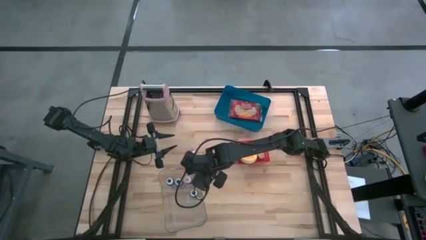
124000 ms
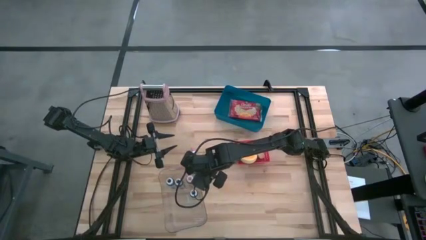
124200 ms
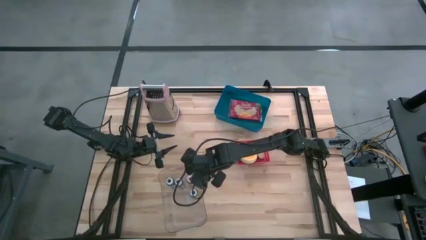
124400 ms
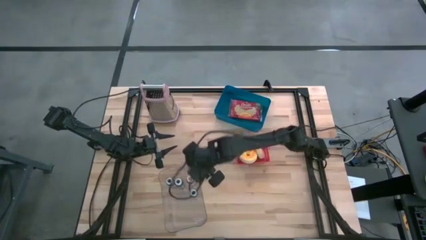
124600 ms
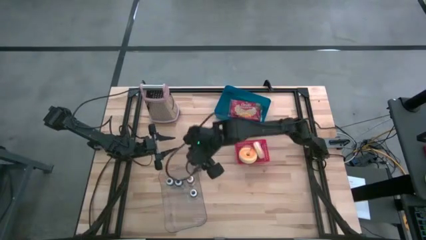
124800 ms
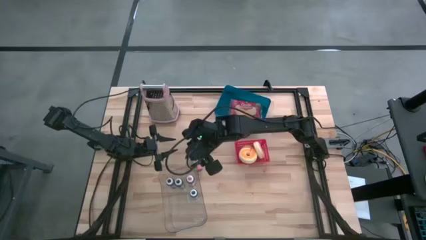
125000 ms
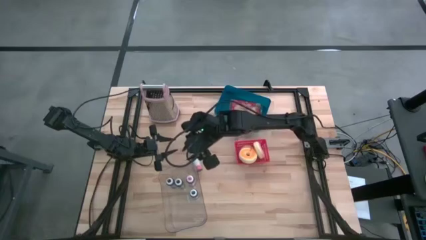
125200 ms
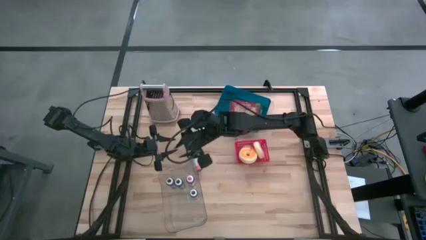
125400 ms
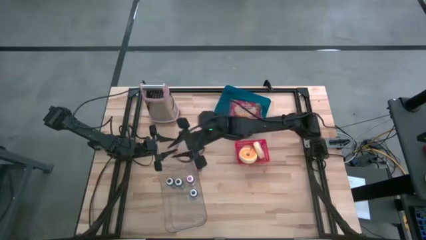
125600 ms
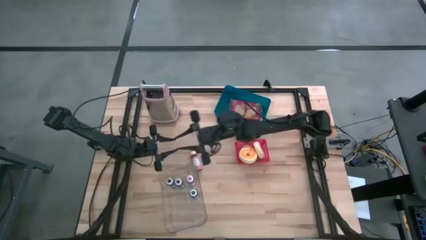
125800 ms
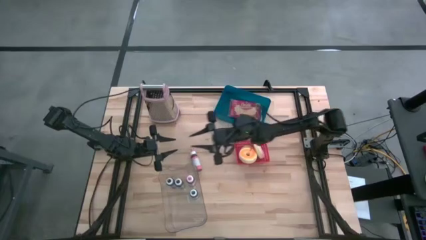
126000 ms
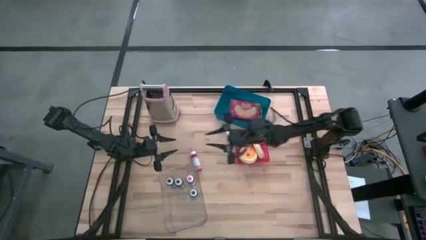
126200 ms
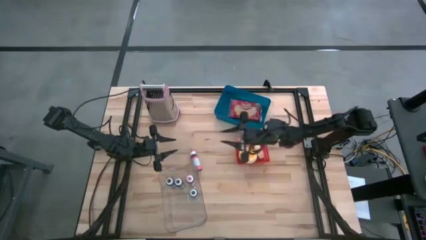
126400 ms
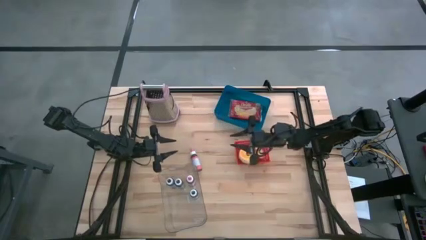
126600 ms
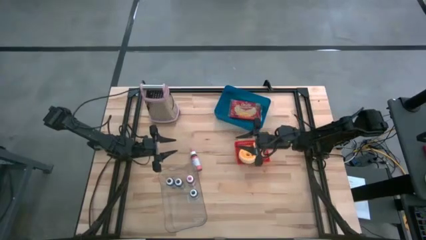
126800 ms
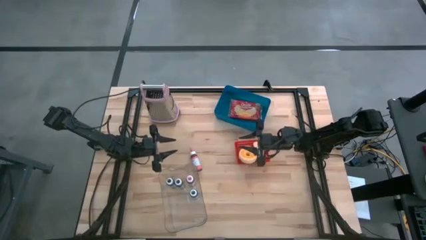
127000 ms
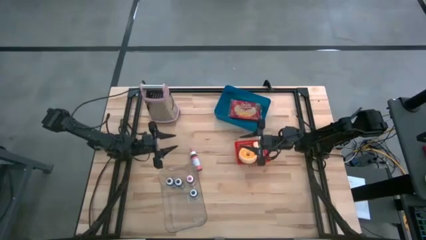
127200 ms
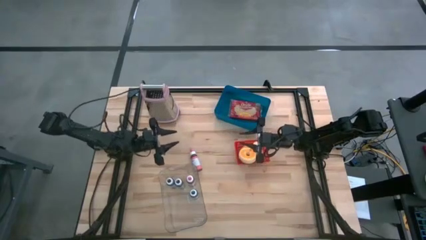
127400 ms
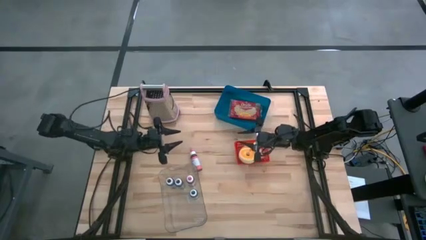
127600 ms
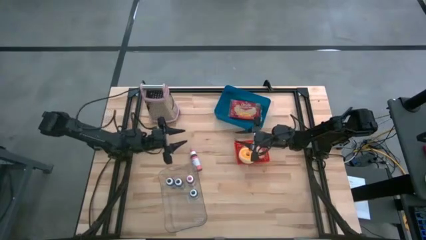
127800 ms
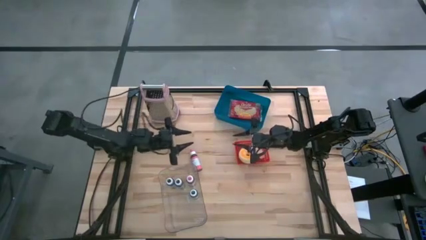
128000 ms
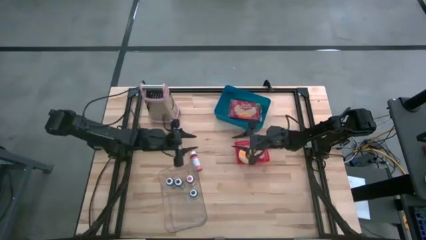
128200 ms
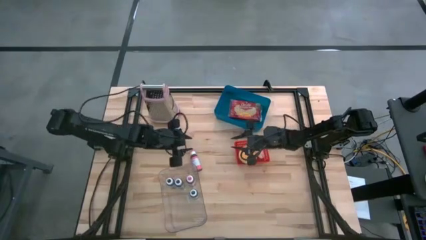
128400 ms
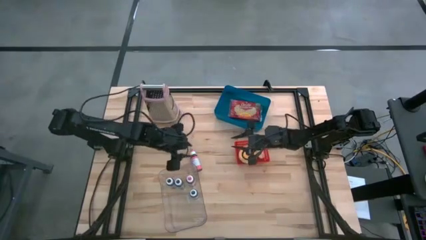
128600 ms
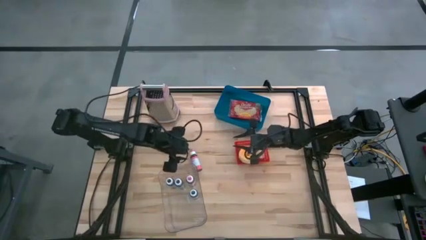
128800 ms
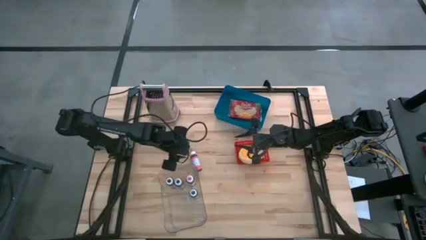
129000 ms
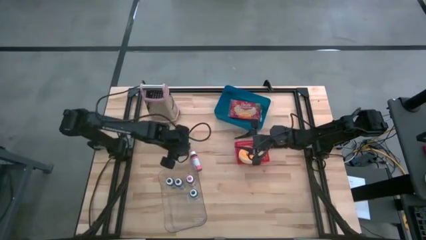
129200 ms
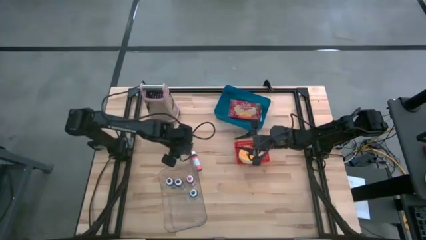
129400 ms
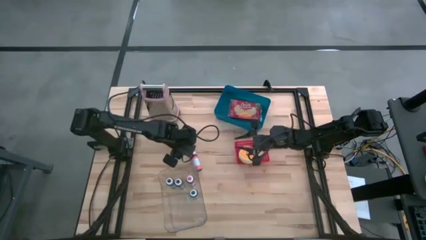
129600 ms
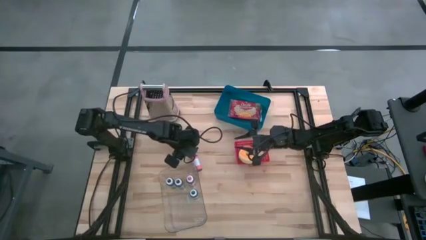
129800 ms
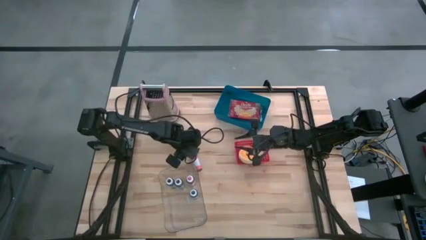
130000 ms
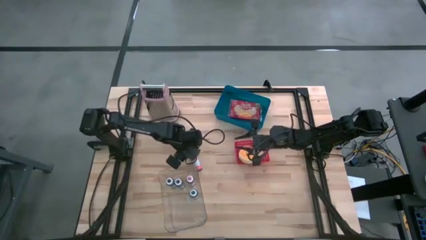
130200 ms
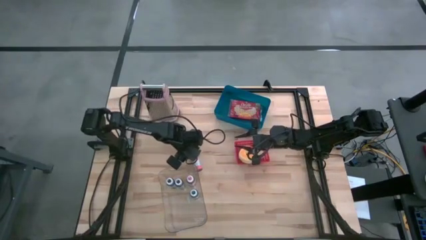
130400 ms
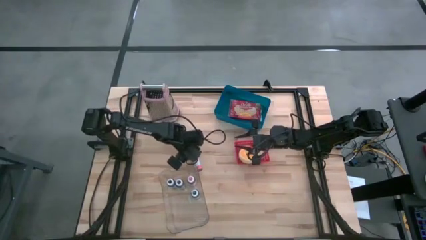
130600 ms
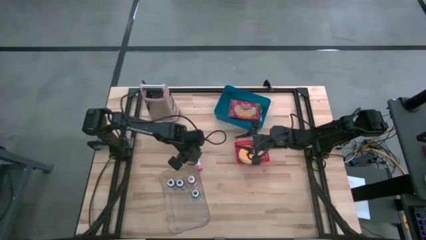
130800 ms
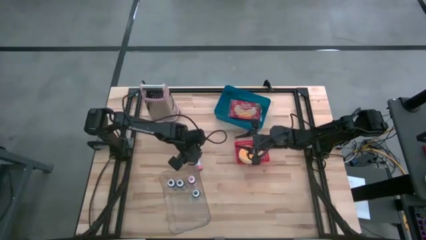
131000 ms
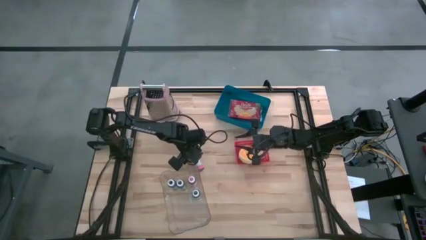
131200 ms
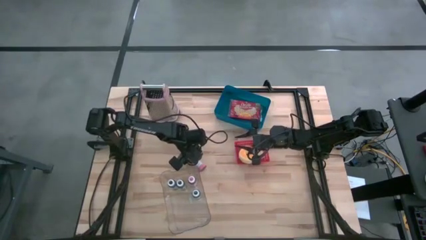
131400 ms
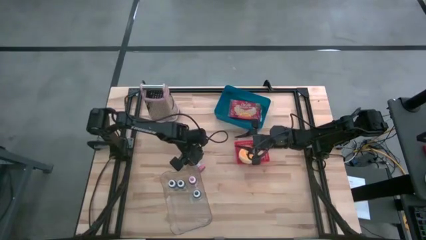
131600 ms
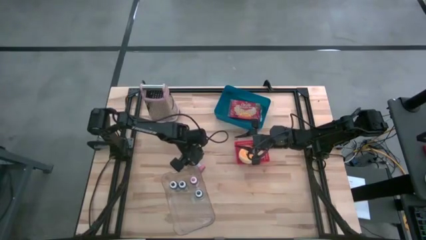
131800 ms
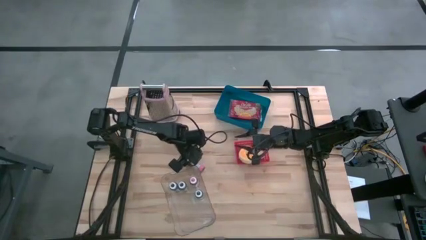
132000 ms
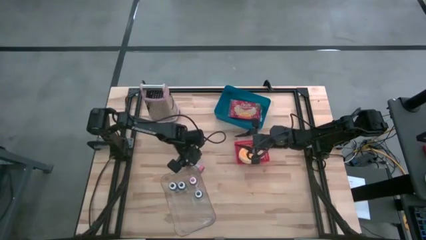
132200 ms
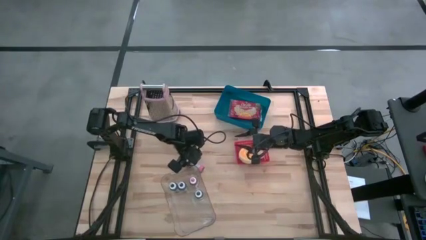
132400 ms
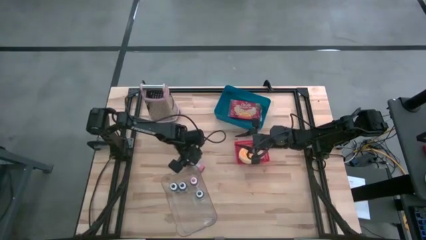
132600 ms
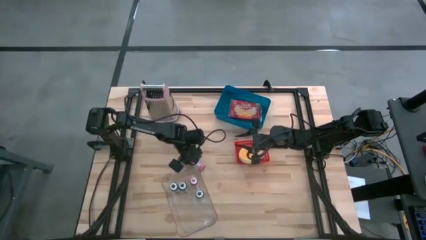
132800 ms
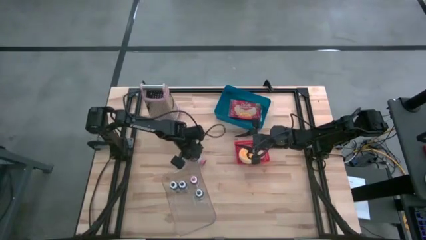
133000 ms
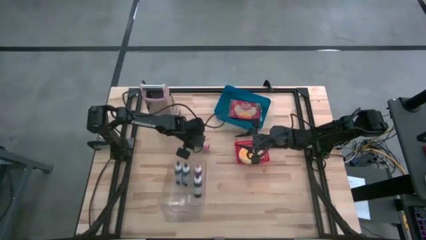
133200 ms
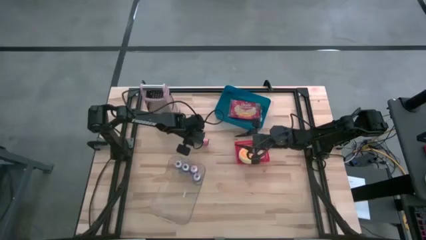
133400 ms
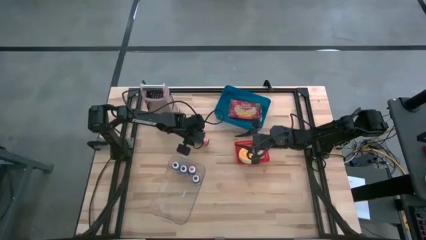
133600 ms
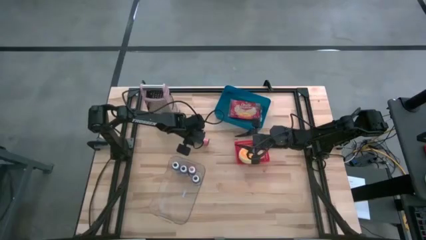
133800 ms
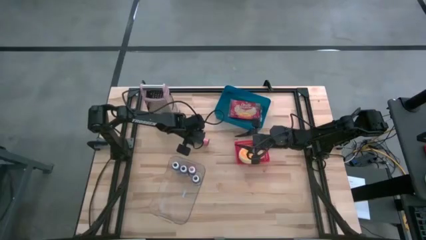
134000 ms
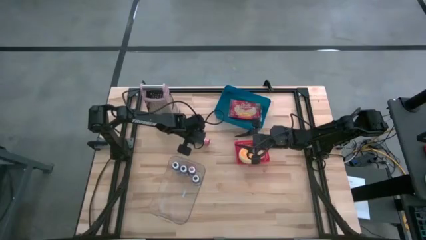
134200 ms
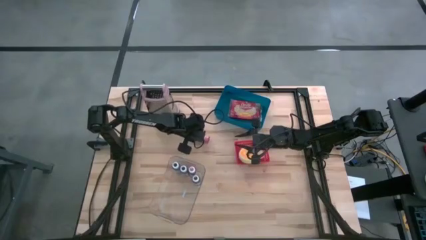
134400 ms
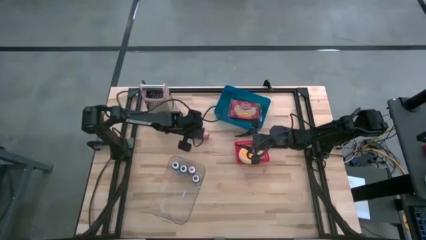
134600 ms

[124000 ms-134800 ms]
Task: Pick & Place Food Item
Put the pink food coloring bottle into the transparent bin

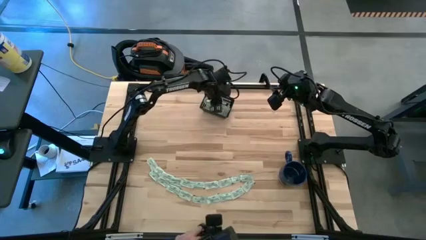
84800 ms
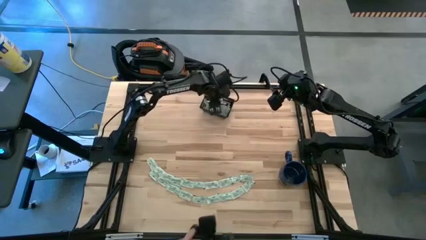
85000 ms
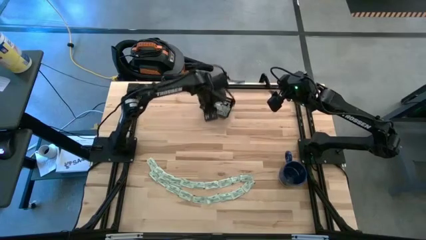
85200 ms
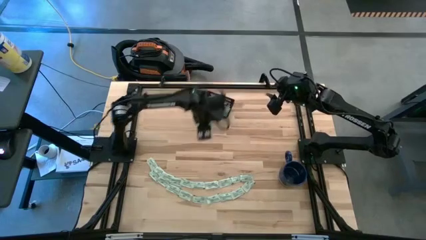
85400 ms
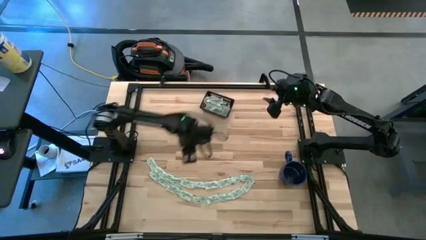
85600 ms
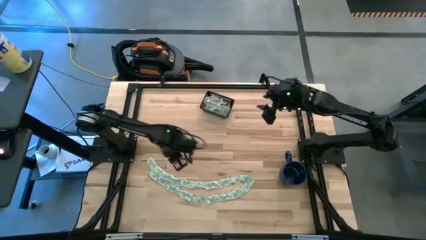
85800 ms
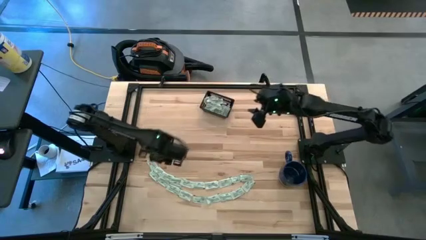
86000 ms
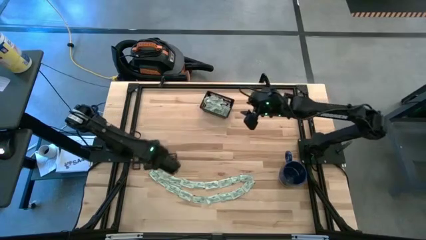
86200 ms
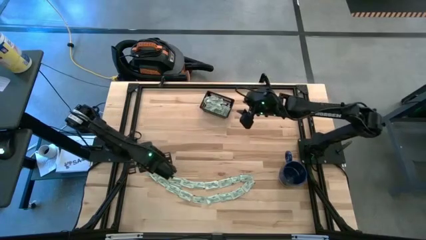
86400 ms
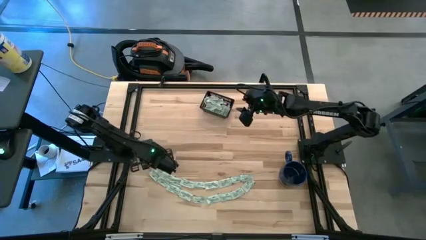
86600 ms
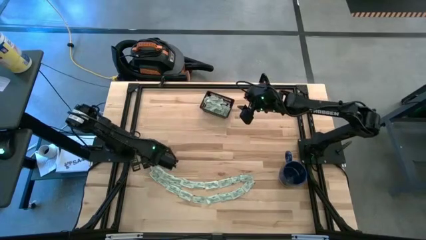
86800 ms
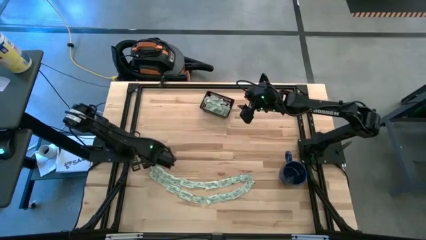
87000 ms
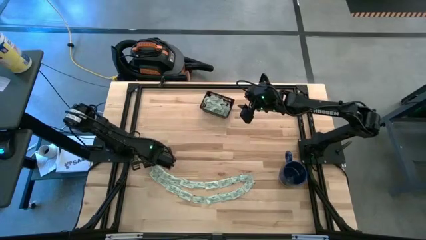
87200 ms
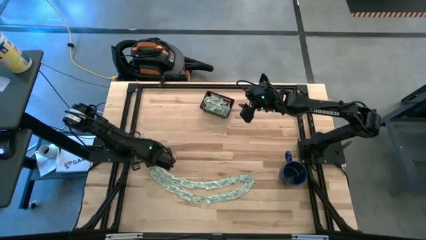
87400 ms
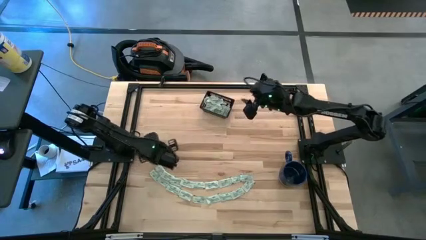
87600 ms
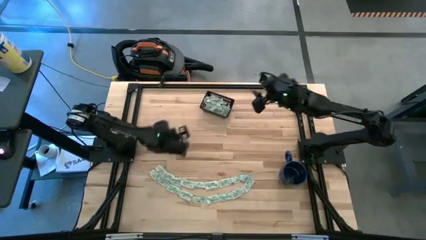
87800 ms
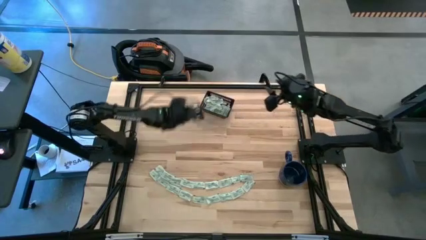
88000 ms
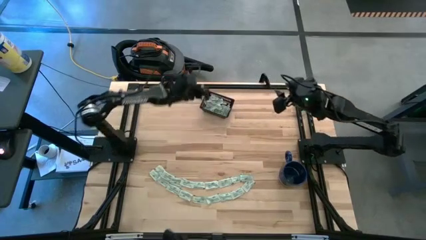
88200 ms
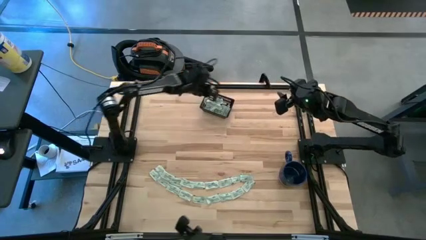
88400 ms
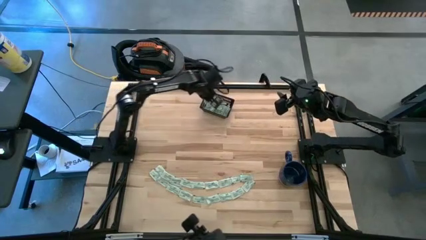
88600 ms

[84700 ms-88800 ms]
Task: Pick and place Stevia / Truvia into bins
Put the stevia packet into the black bin

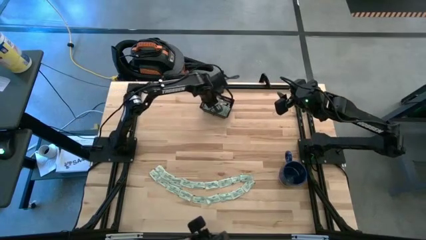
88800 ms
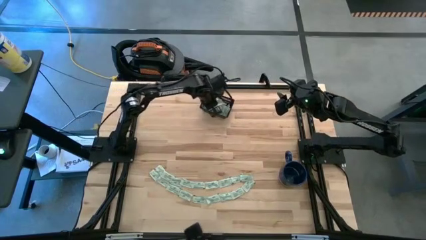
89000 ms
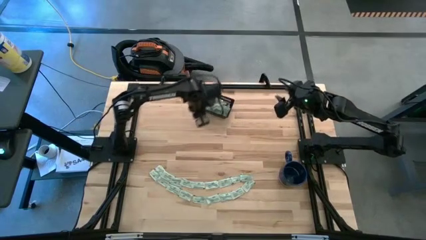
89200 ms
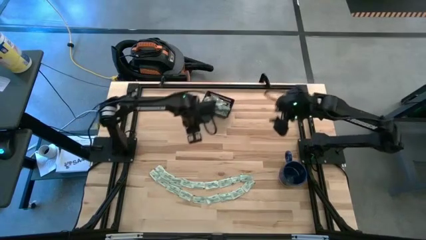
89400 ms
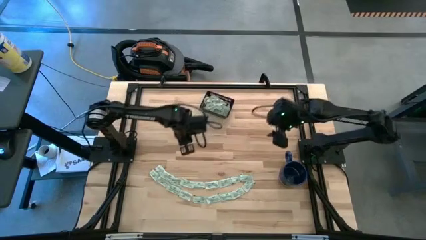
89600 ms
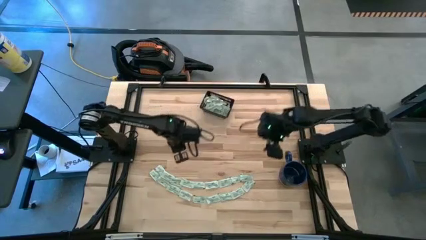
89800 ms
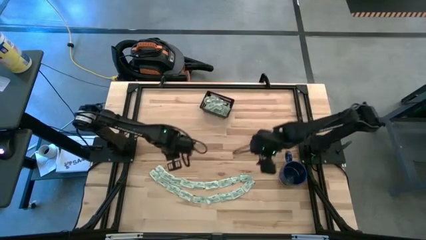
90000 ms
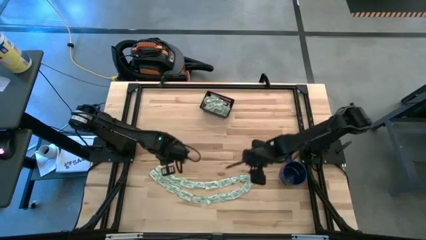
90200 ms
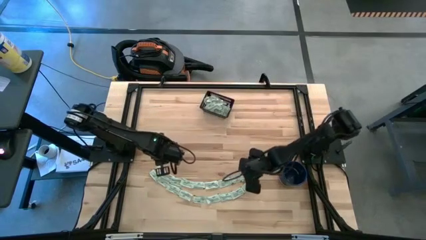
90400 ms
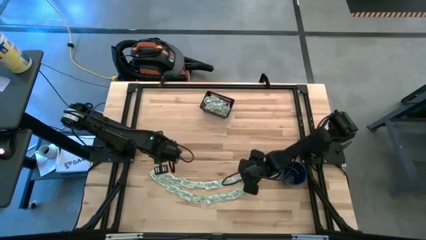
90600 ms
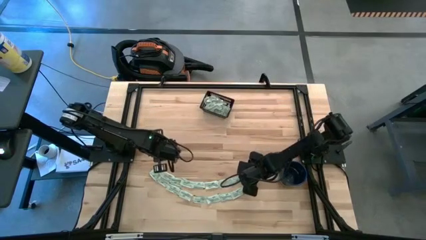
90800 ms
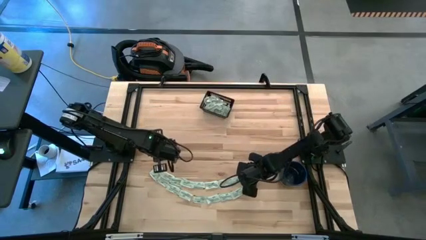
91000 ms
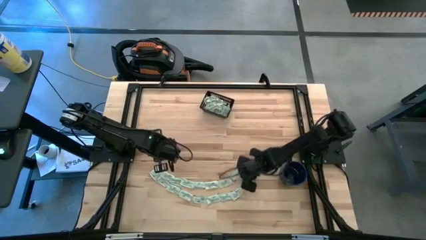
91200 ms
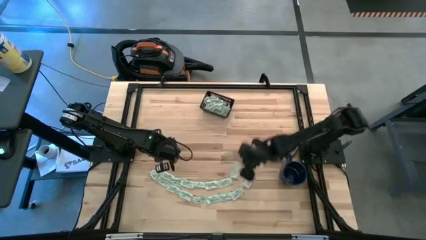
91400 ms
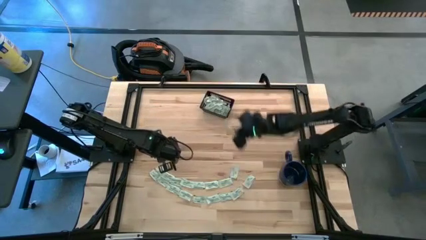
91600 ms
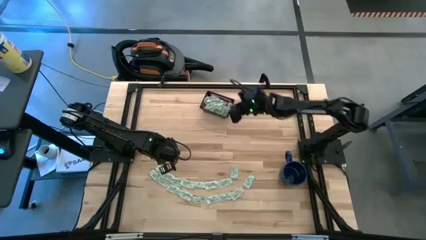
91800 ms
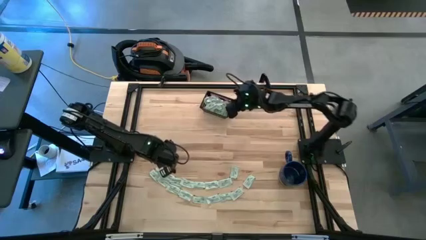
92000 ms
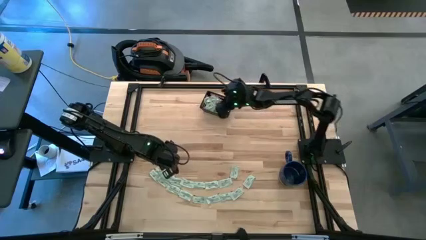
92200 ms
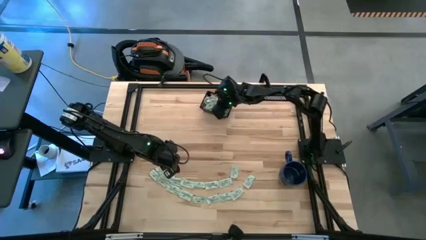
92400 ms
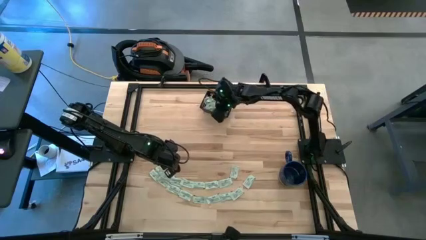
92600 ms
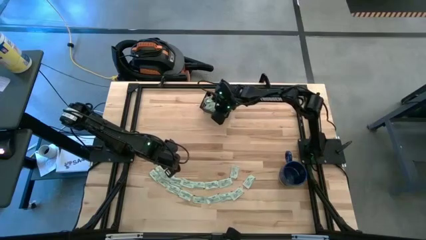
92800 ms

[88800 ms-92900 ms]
Put the stevia packet into the black bin
